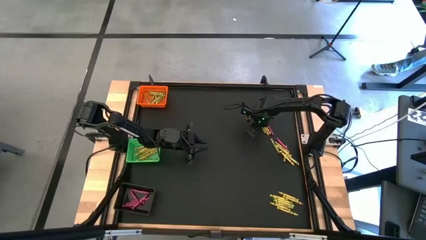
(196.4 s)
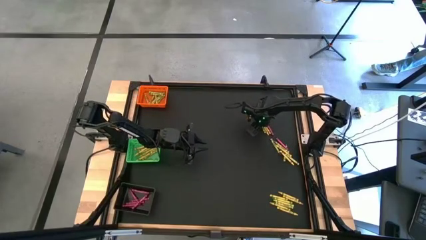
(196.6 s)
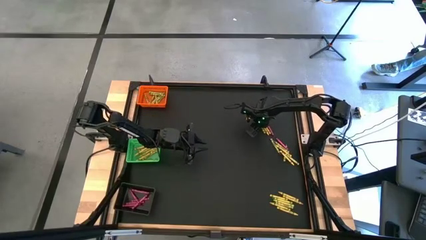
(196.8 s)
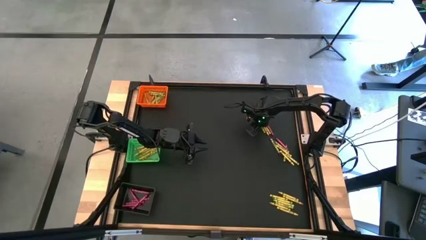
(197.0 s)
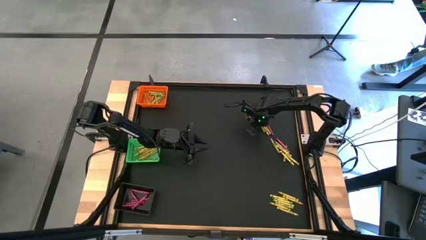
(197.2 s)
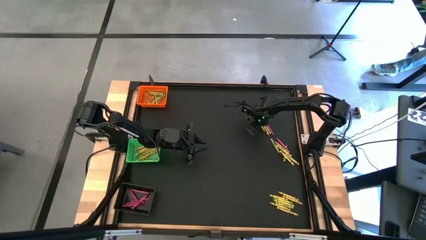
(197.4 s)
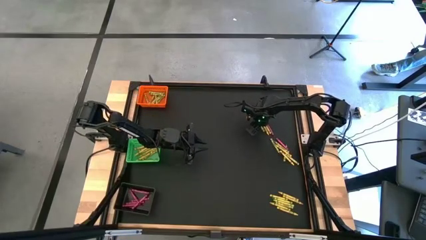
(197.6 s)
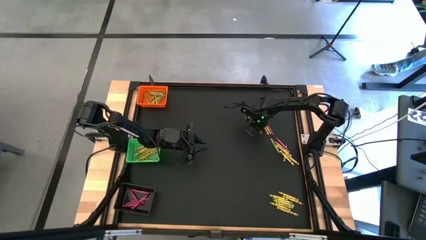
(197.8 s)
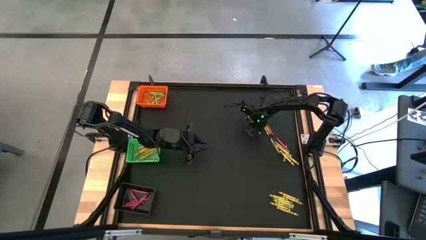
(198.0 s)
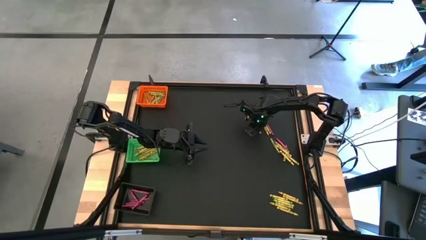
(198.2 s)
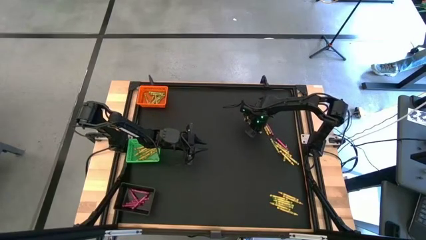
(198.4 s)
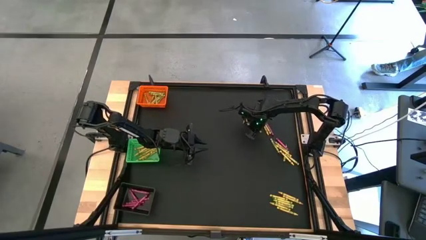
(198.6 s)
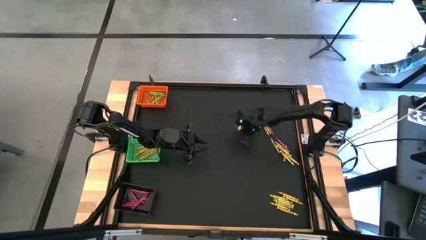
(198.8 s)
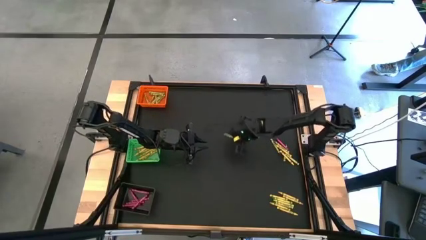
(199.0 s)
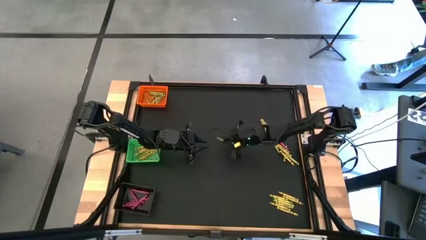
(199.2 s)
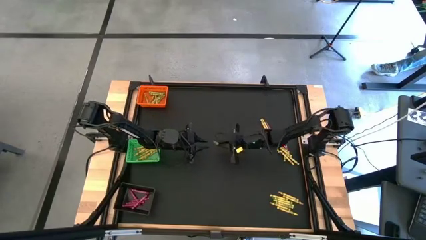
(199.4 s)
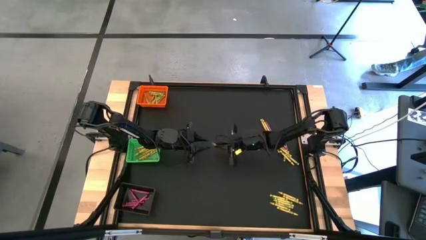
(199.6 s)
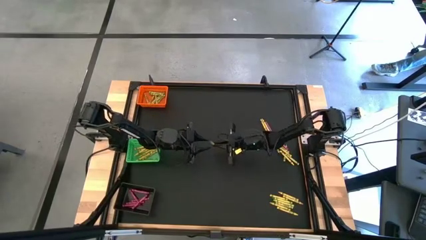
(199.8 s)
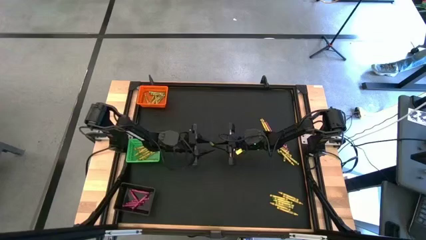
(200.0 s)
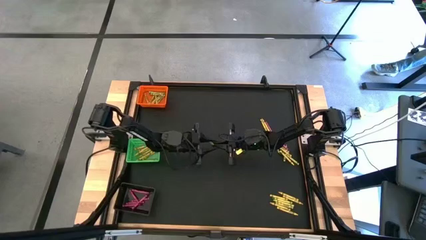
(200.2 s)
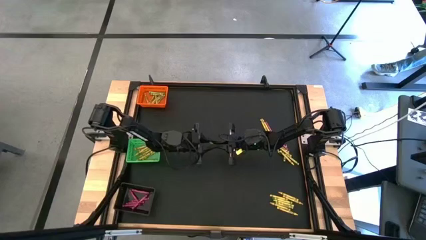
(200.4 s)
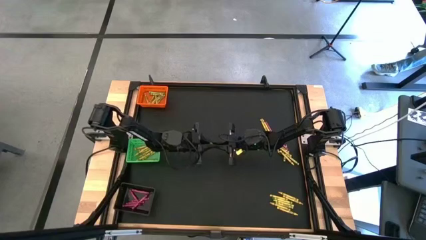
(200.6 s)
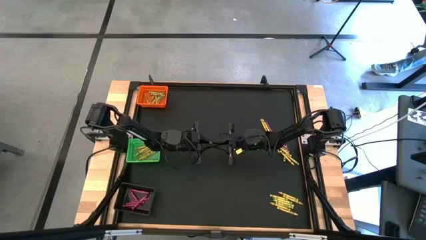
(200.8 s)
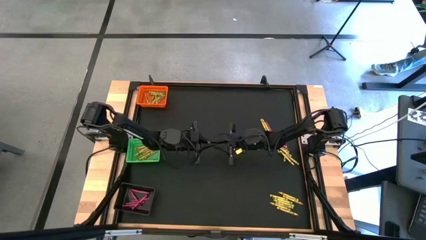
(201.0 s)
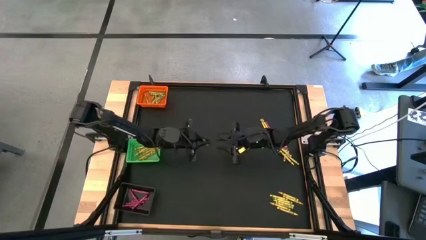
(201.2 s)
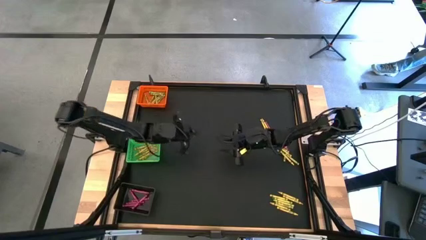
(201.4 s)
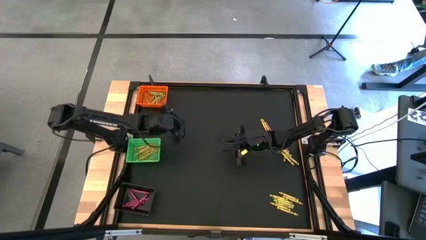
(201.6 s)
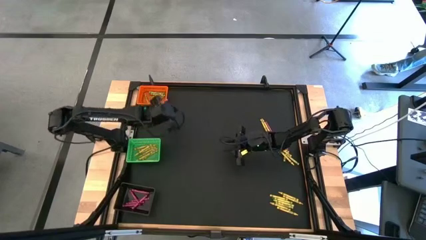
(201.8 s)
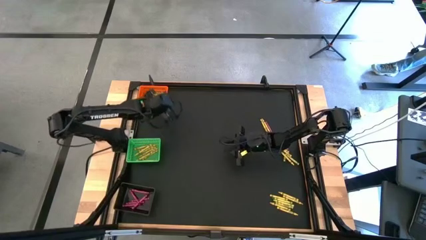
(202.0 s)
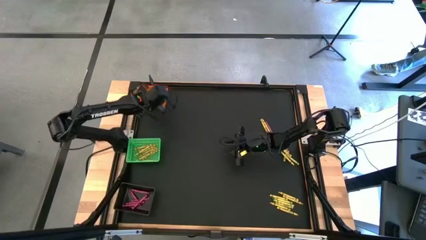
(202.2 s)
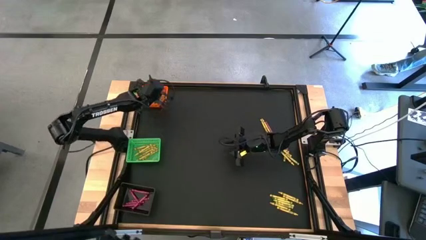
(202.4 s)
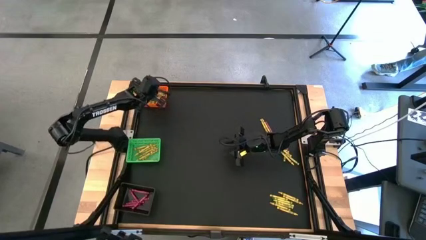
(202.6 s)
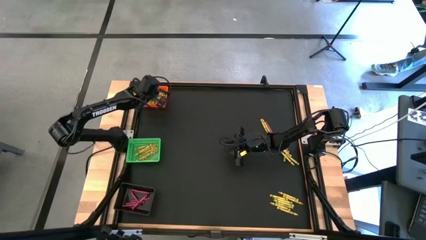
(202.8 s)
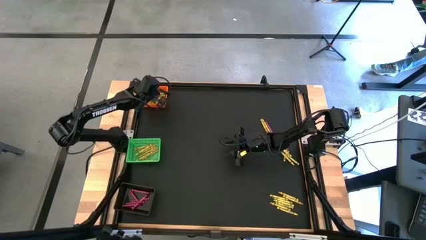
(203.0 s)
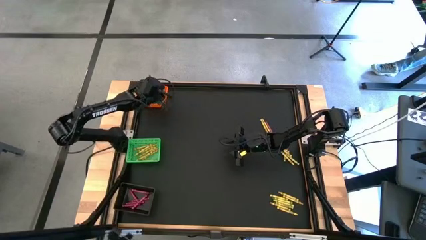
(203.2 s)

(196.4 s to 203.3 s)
Task: Sort crayons
Put the green crayon into the orange bin

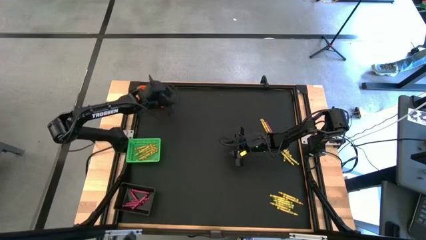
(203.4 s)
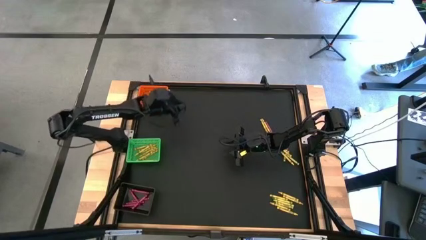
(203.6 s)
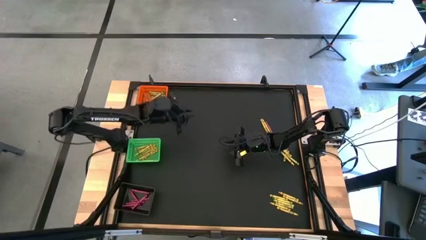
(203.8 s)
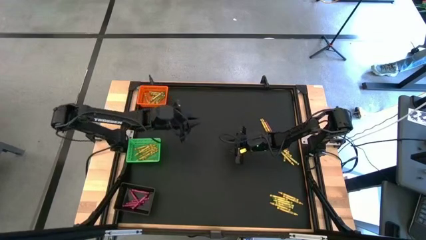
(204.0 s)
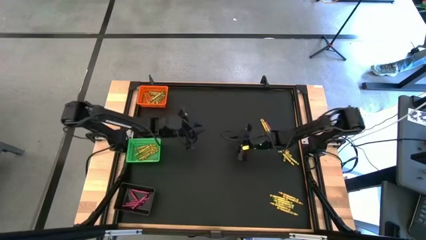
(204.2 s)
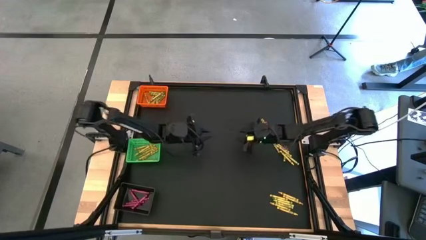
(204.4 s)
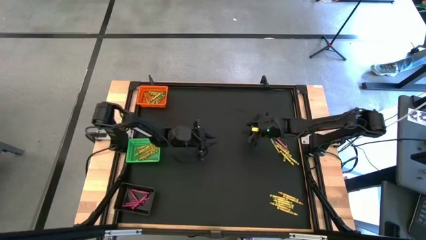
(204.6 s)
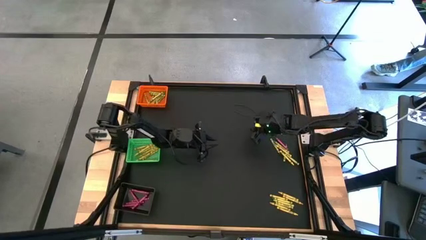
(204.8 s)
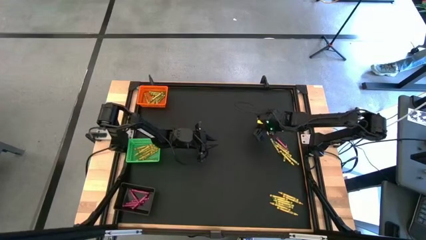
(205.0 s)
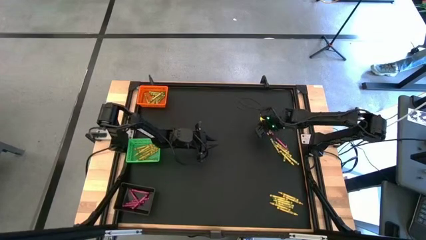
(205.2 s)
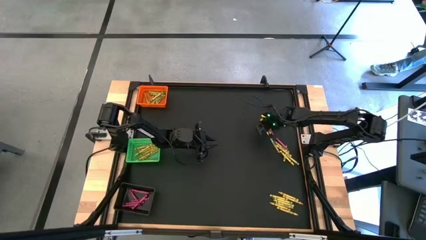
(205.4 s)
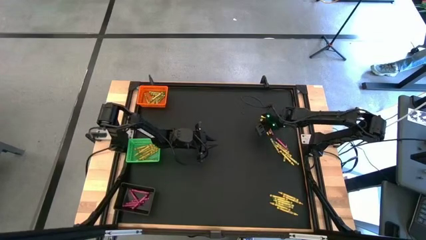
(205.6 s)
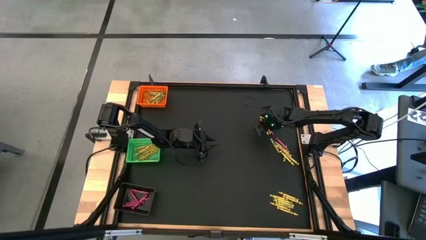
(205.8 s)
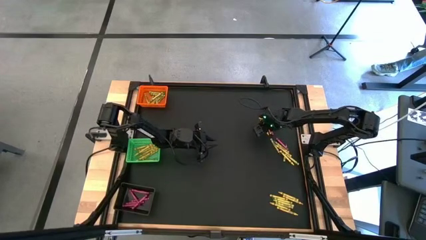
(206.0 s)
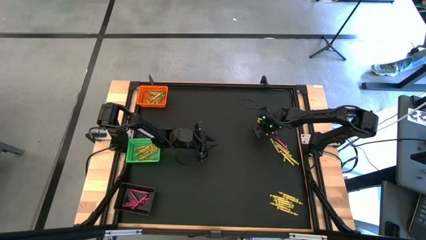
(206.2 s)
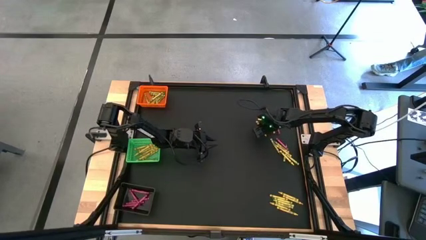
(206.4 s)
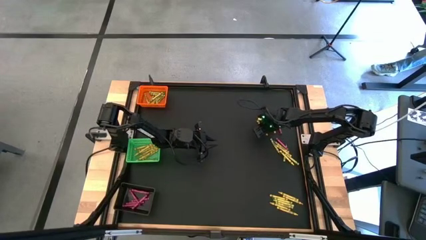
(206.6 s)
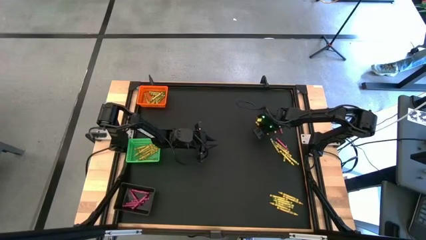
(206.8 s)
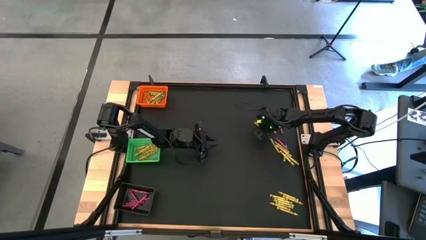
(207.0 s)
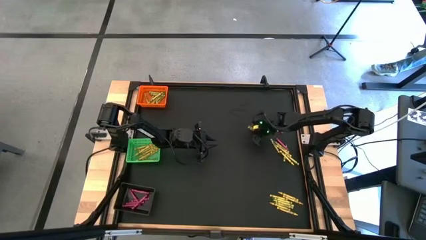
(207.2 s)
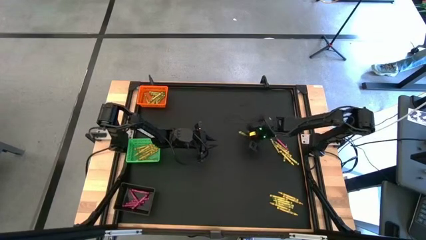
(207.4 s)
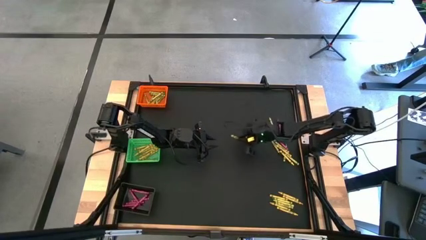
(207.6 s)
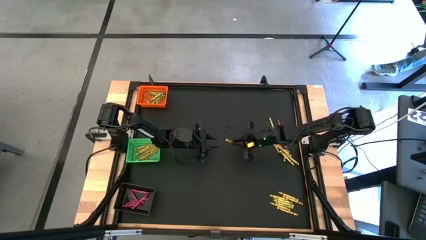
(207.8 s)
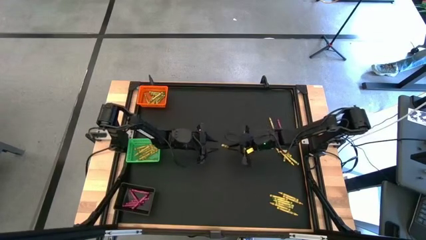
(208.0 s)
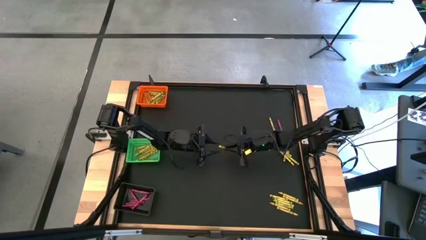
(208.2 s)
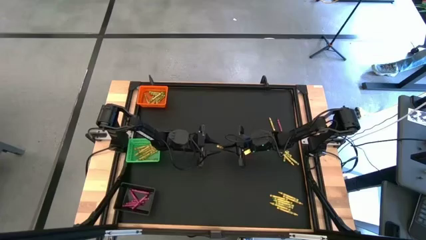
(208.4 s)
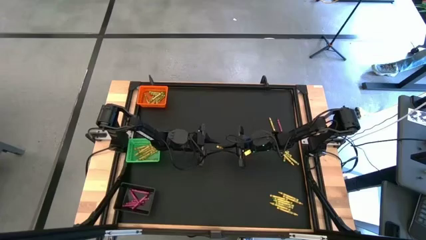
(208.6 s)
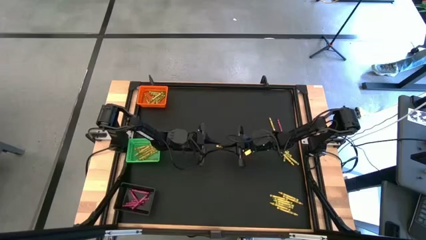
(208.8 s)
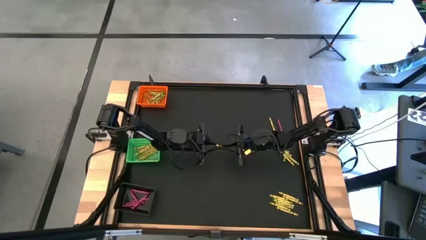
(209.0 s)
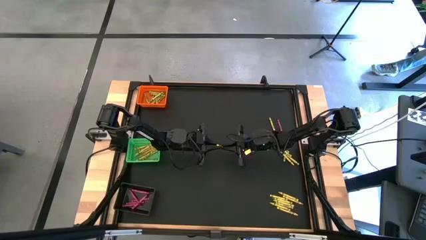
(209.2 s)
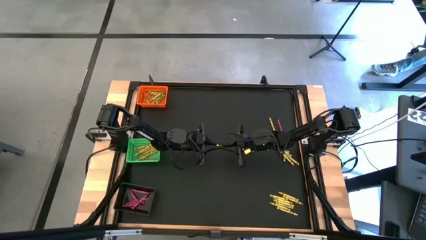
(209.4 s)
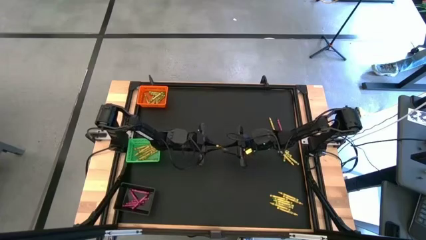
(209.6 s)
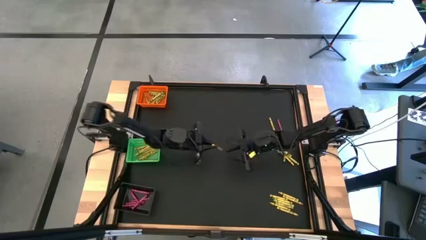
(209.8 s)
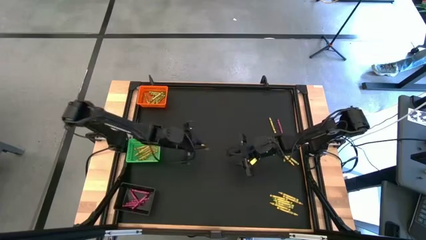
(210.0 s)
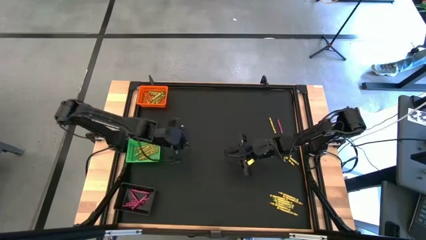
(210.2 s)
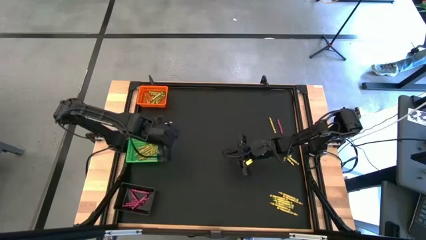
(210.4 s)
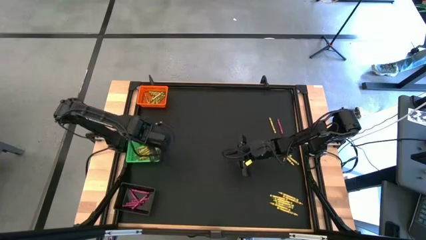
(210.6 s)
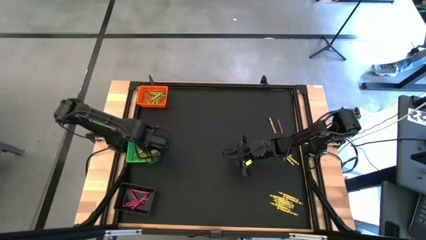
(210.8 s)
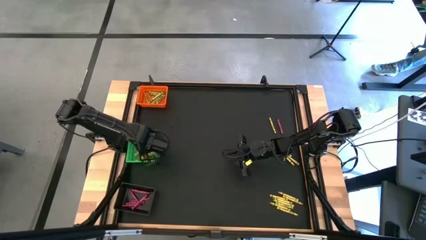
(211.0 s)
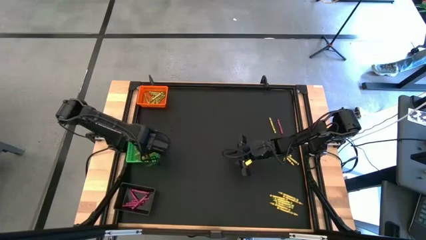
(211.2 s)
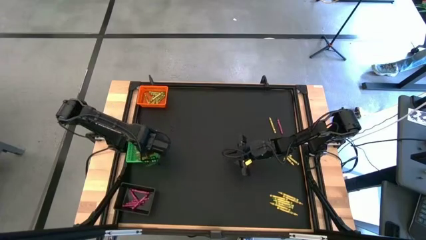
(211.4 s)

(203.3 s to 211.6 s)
Put the yellow crayon into the green bin

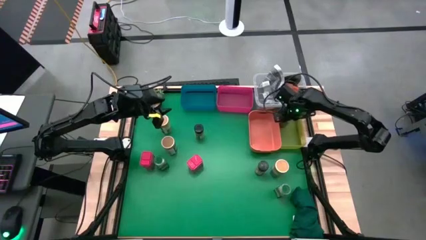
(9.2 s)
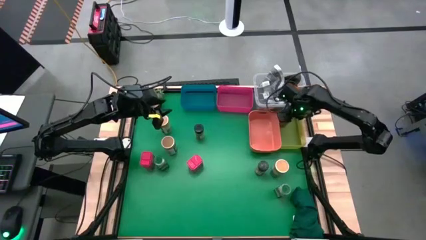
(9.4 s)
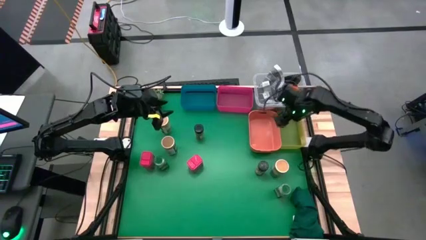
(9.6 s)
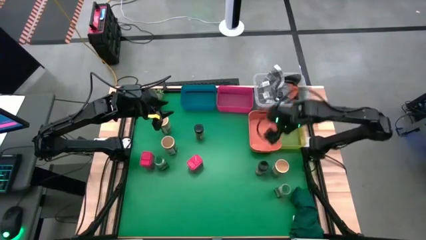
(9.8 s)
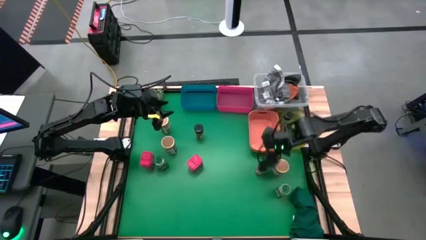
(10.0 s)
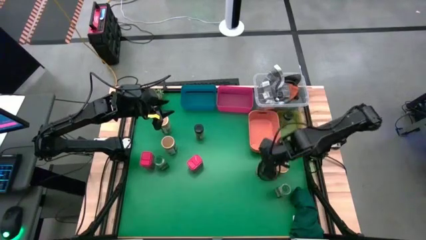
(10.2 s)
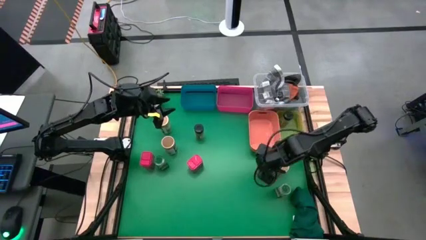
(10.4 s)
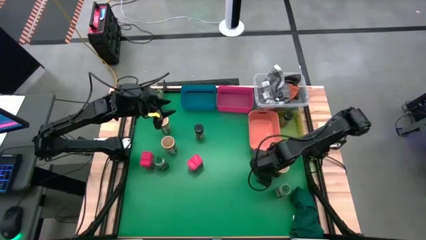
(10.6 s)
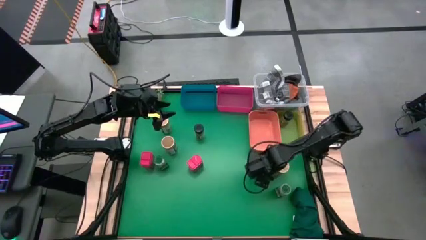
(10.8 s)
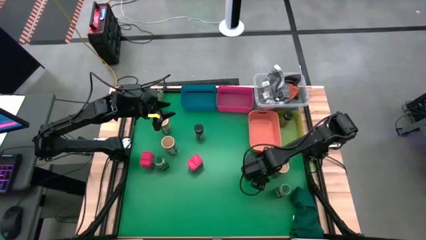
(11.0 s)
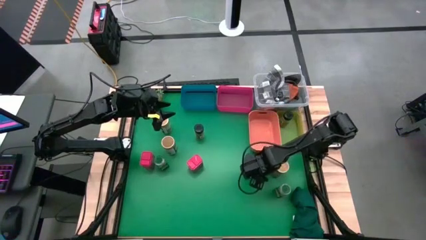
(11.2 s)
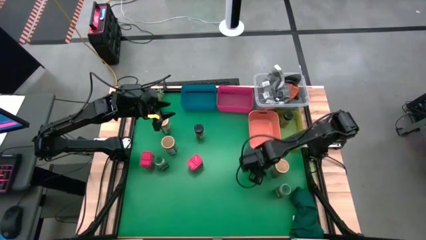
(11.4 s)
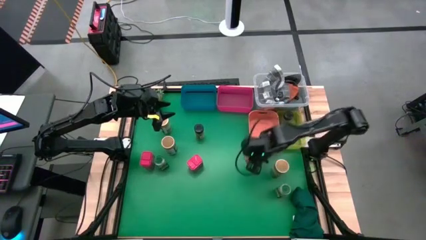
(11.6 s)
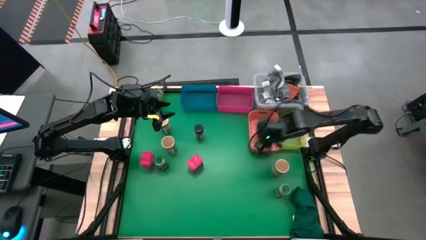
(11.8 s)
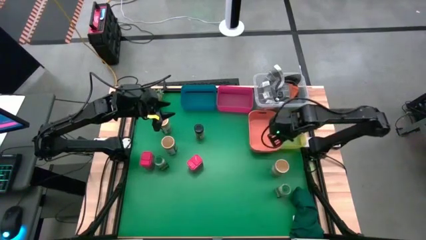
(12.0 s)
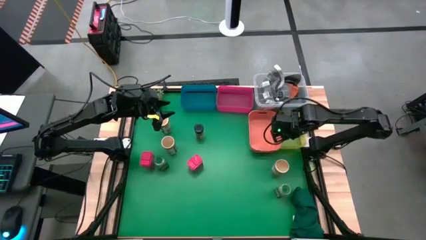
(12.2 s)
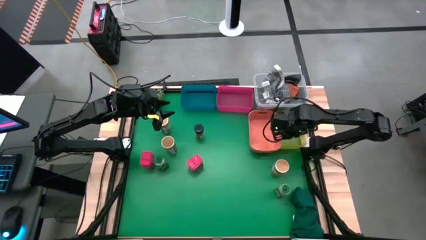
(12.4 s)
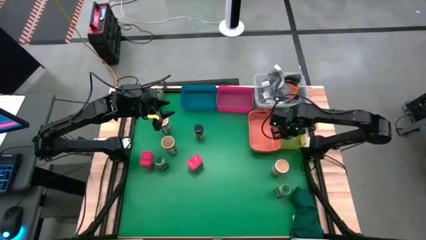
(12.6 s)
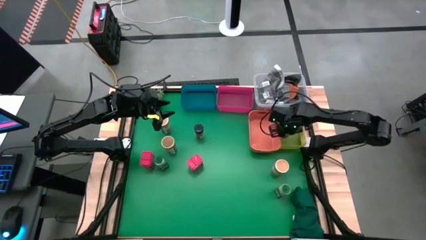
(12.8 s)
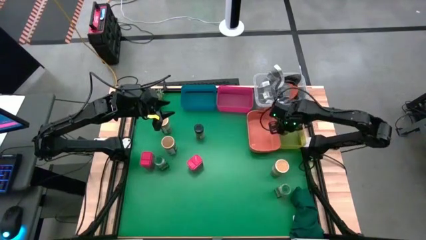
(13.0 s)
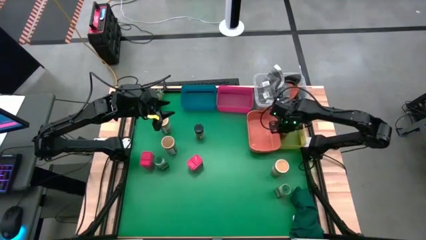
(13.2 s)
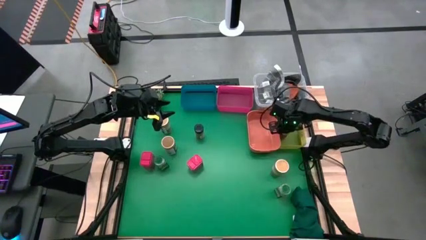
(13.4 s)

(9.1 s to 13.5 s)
Task: Sort spices by type
Put the bottom black seasoning bottle into the yellow bin
